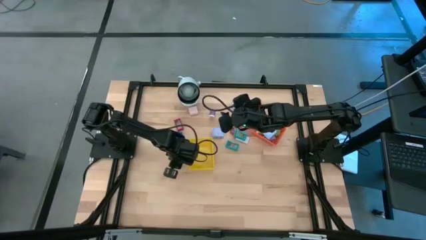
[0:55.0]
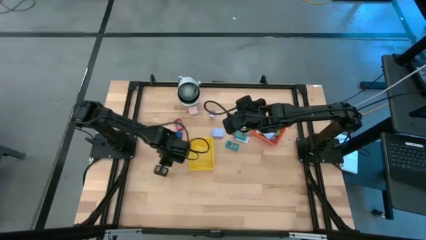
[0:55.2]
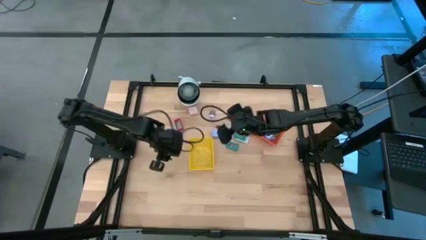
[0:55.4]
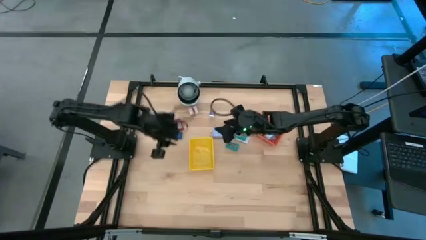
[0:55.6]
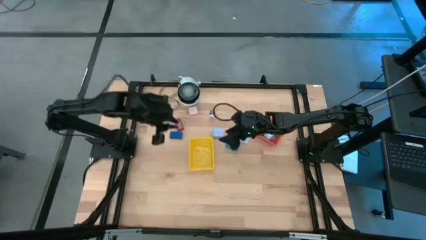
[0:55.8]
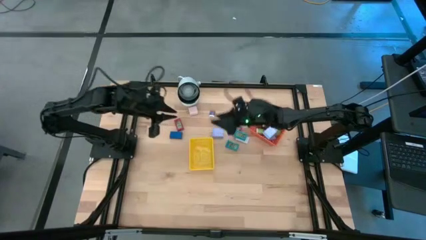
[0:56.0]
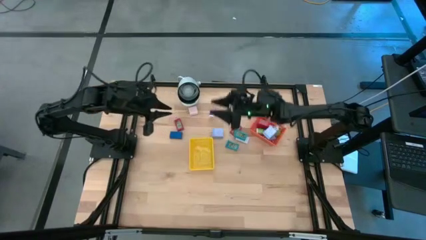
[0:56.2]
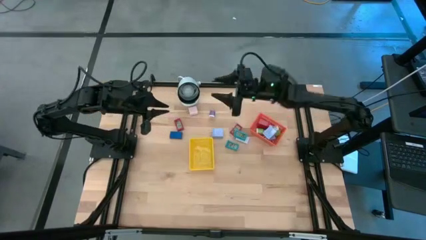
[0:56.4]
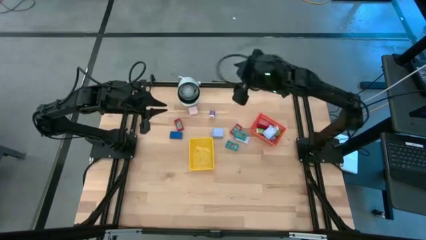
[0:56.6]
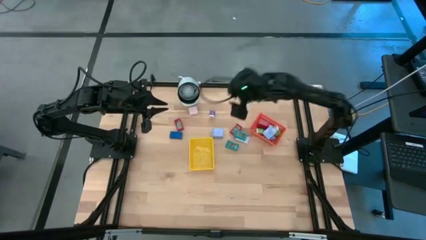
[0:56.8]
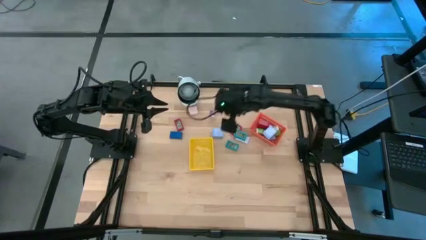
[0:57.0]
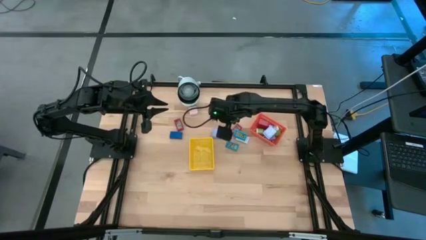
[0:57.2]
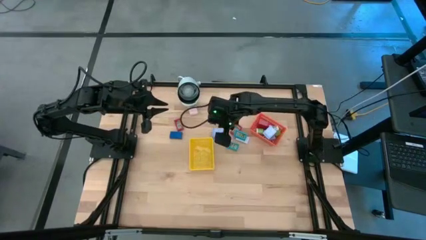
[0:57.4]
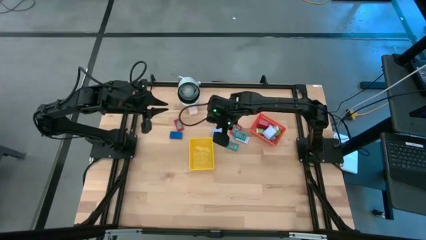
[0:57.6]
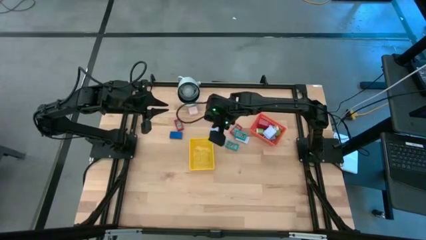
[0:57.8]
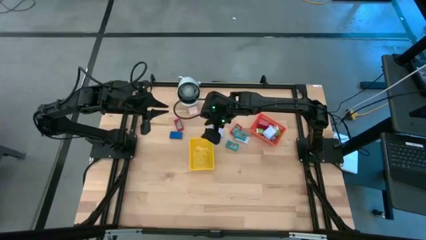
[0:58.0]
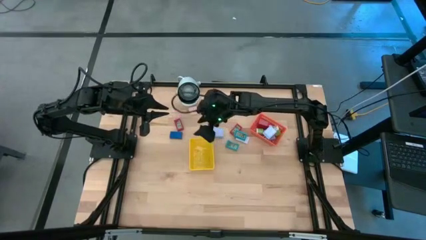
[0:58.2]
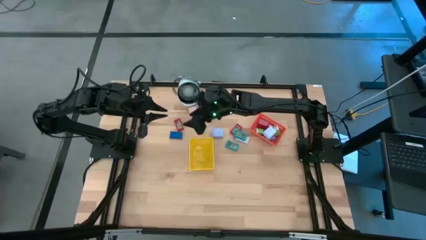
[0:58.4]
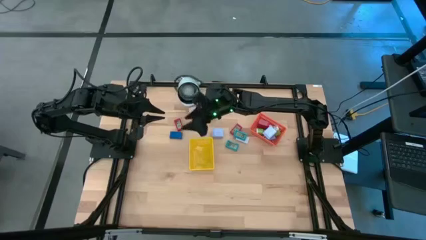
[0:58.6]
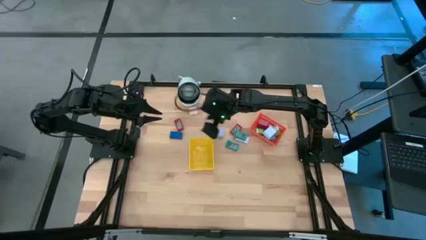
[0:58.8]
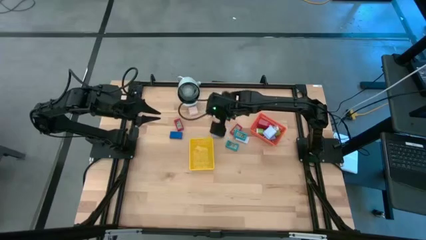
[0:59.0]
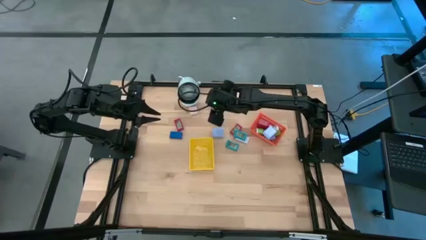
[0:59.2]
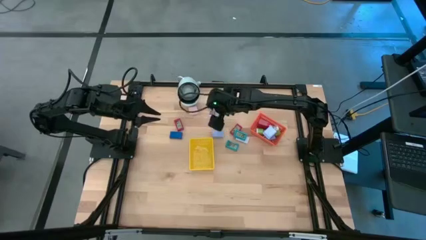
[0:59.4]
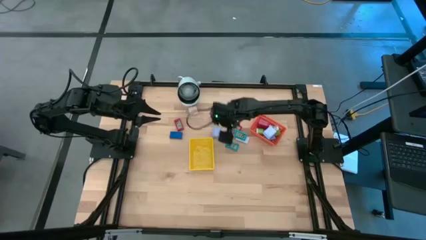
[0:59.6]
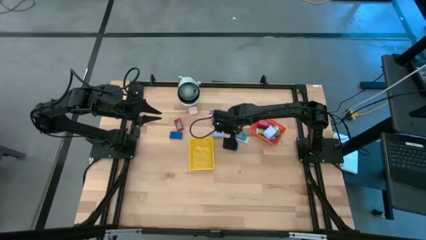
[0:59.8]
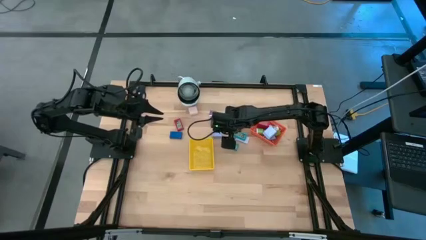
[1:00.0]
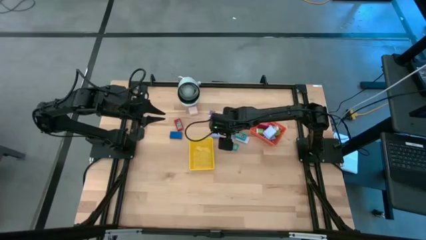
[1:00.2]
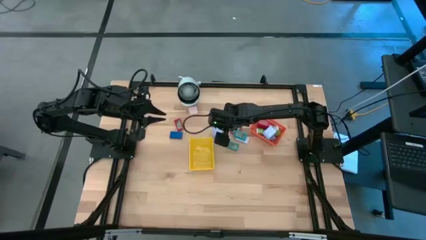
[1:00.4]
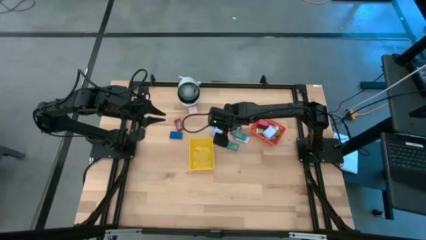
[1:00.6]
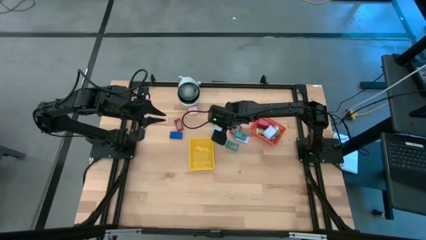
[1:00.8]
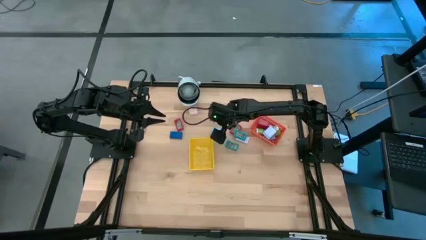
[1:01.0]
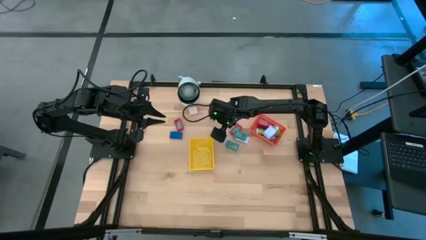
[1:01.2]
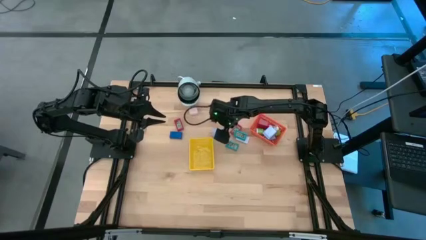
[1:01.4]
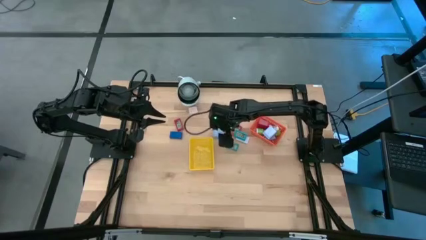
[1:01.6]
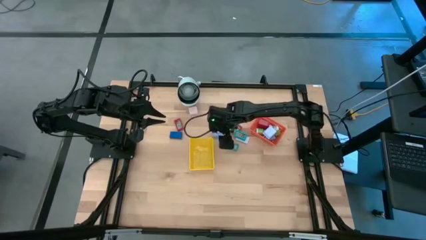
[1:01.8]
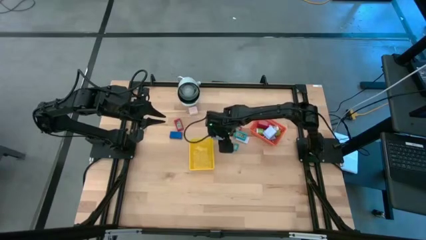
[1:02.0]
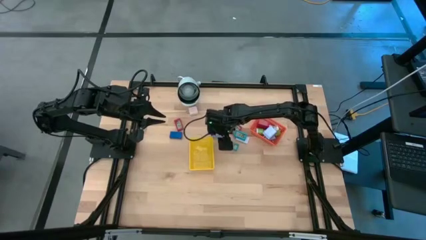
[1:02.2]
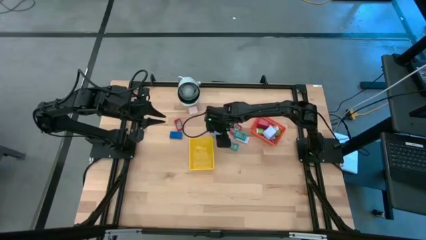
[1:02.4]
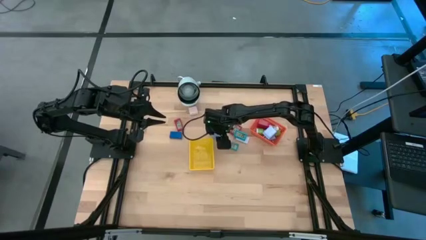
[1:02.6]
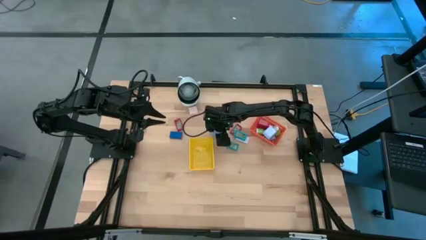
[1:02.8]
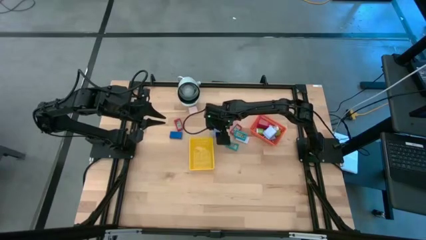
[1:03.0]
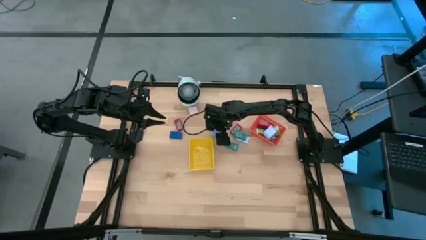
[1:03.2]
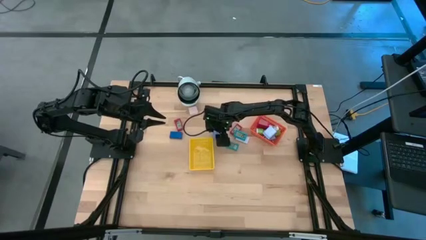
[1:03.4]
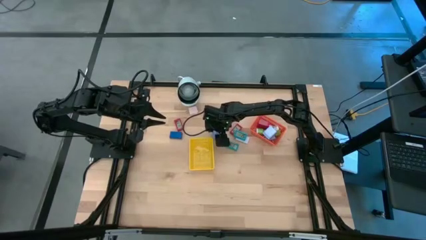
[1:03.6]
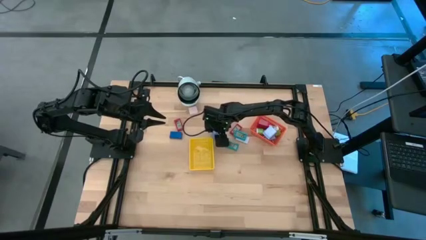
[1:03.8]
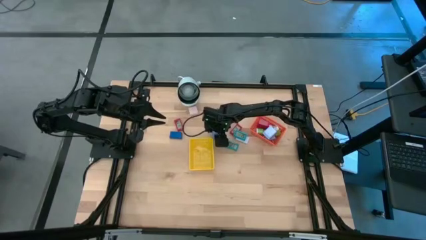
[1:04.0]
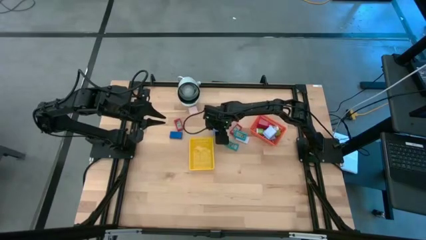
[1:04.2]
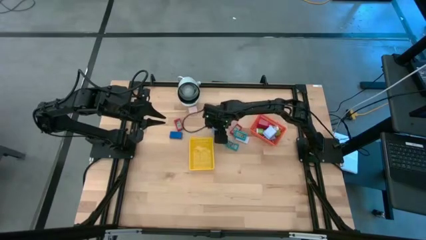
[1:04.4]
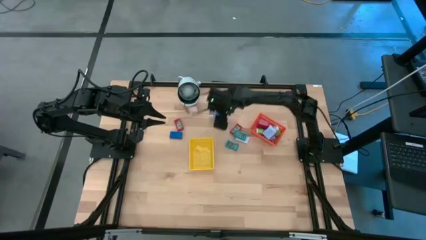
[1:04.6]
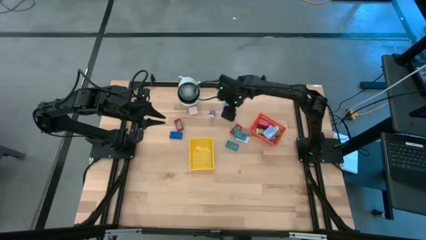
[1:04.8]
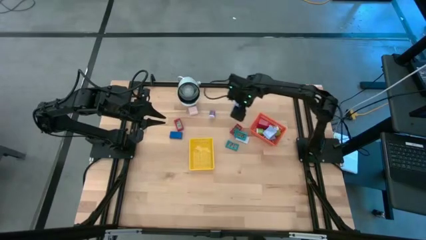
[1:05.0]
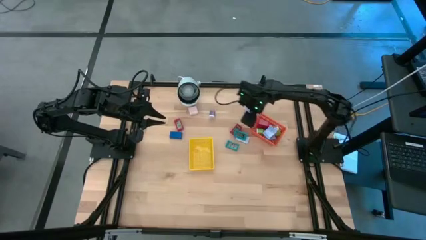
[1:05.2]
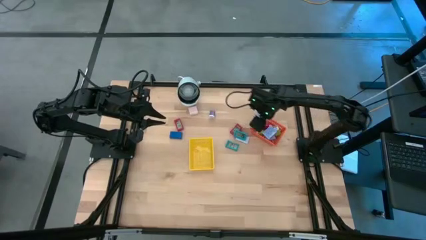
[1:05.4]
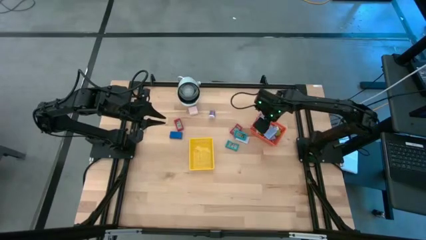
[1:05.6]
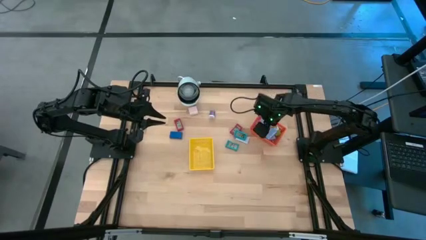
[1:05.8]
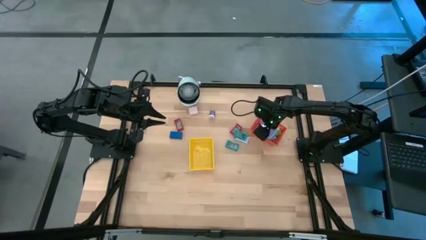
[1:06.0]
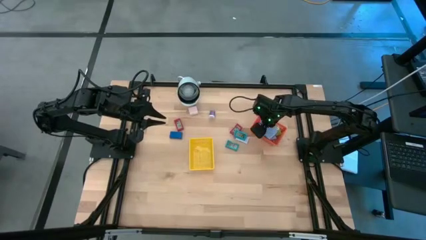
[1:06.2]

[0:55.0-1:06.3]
Task: Pick & Place Office items
Put the blue charger adapter into the orange basket

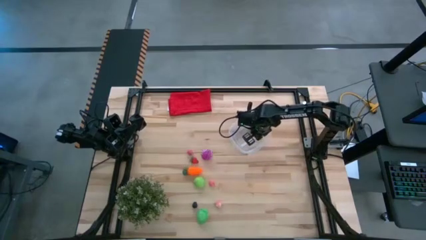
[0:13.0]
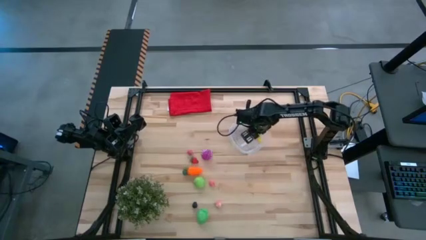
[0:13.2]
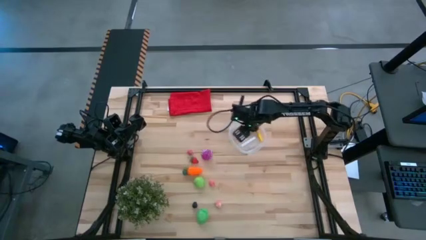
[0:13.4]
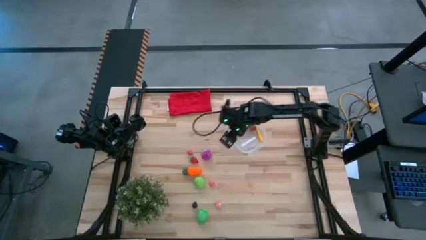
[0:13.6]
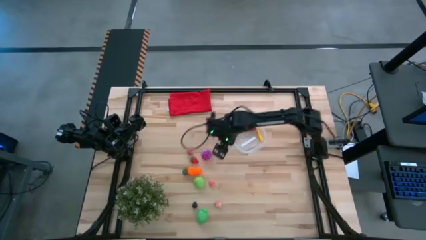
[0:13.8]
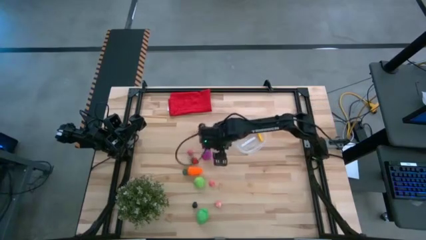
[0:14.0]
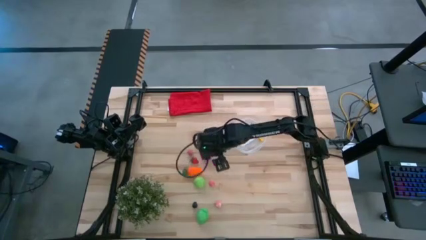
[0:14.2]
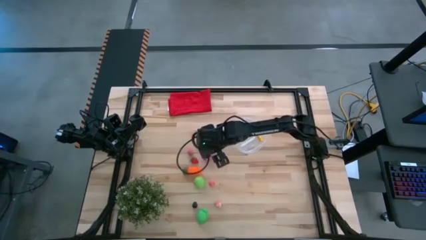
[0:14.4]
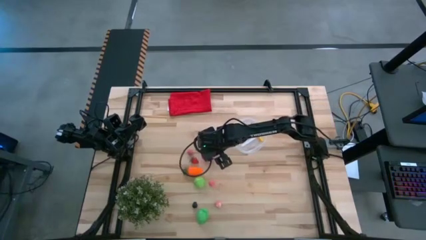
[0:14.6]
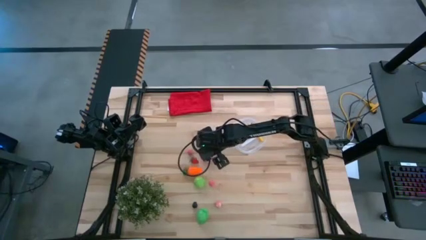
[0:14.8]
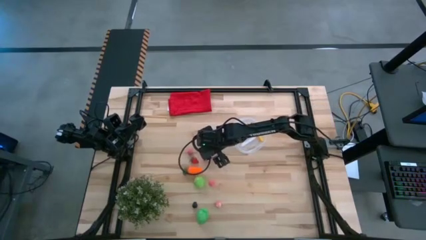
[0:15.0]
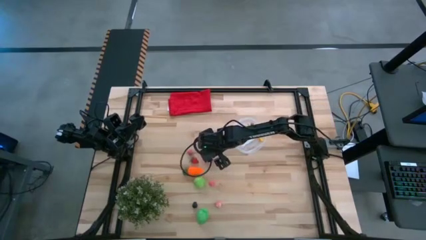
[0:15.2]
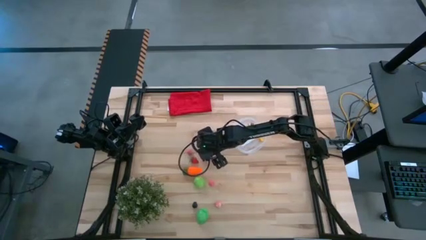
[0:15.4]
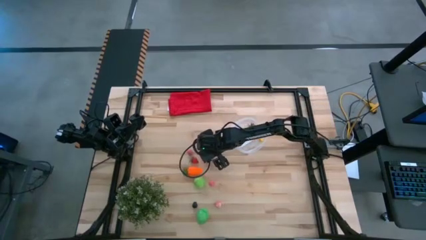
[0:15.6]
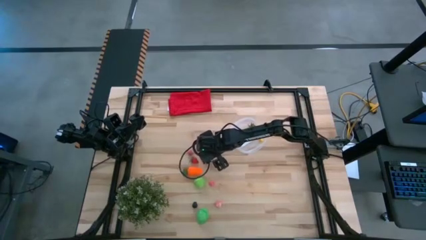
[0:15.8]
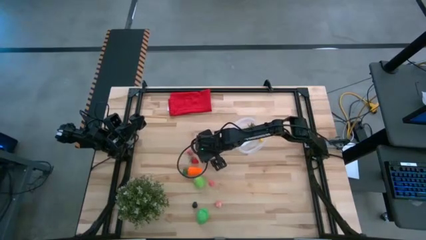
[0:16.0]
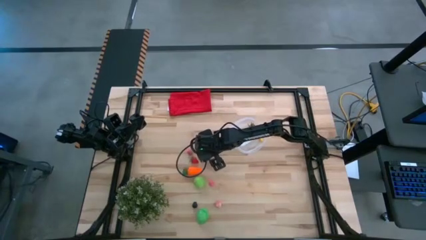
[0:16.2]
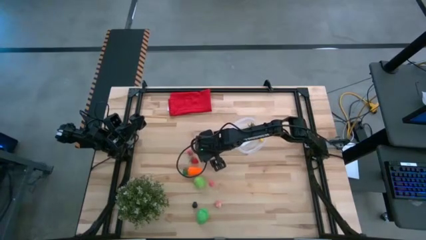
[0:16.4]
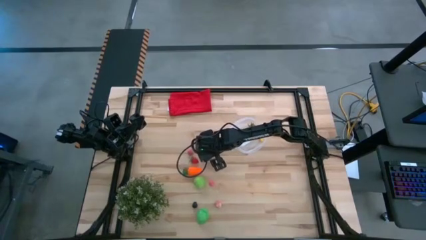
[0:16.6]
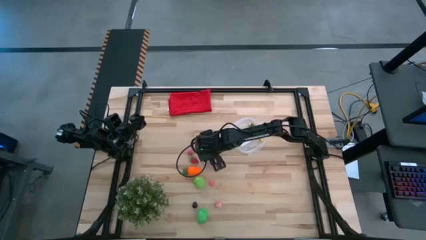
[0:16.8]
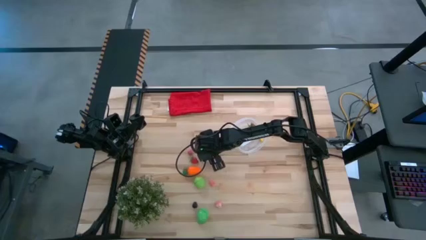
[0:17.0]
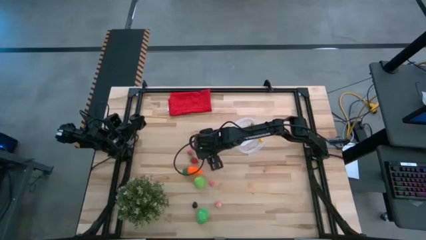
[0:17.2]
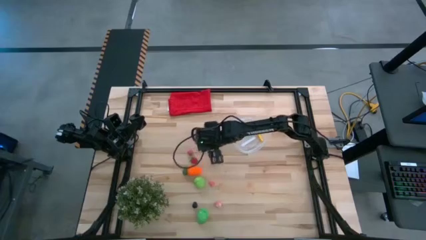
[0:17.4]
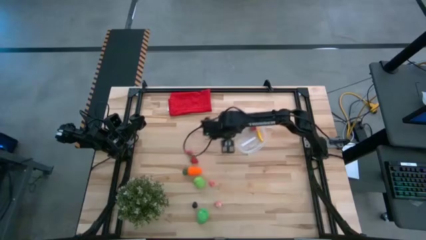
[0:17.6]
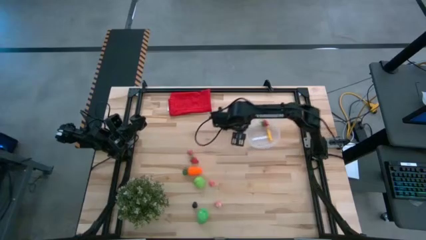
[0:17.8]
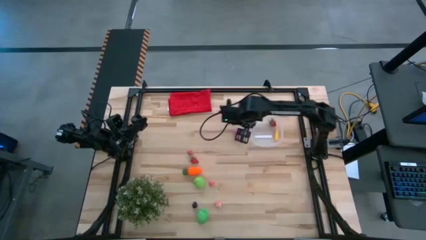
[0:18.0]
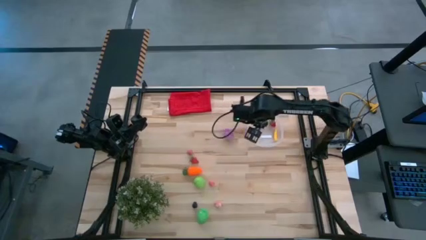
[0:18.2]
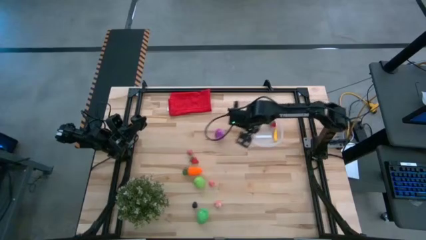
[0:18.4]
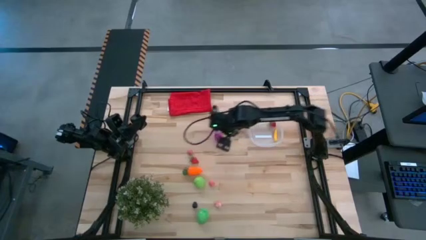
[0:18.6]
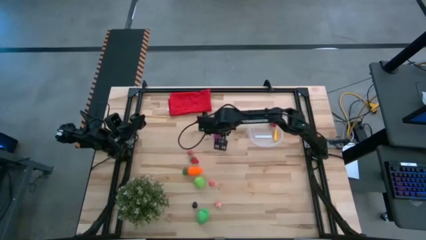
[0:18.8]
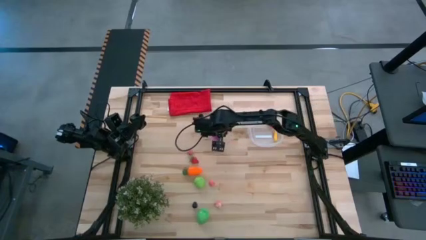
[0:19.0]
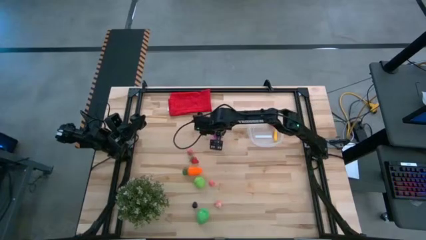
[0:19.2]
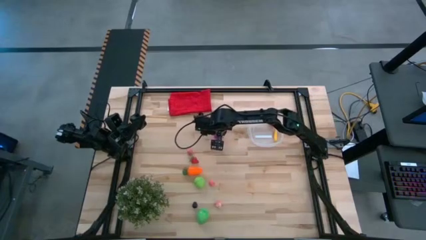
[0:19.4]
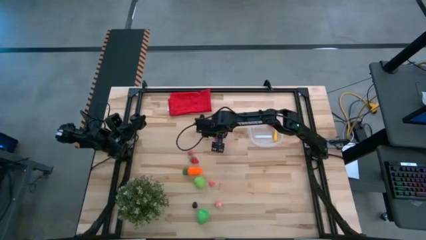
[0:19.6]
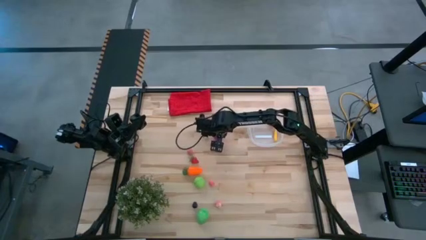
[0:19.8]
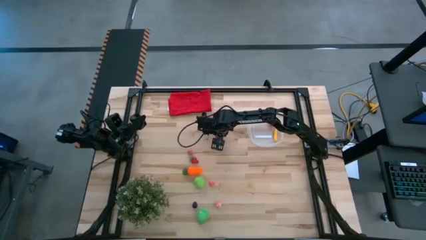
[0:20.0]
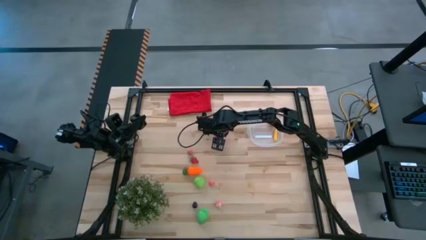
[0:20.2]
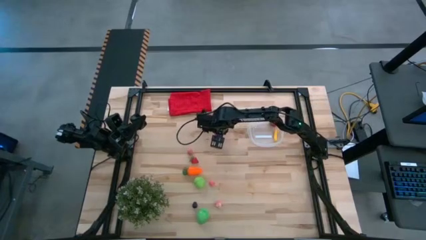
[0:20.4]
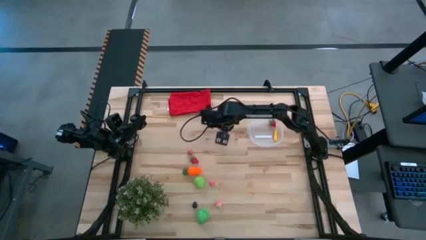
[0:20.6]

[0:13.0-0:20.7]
Task: Pick and placing Produce into tupperware
Put the red onion into the transparent container
